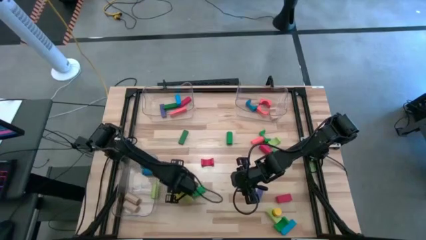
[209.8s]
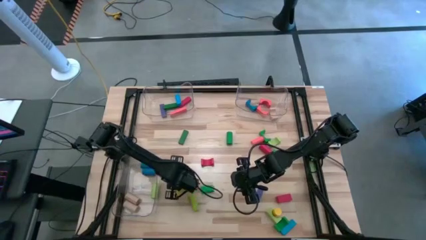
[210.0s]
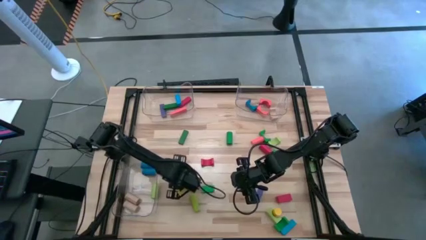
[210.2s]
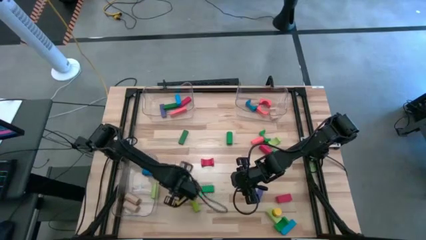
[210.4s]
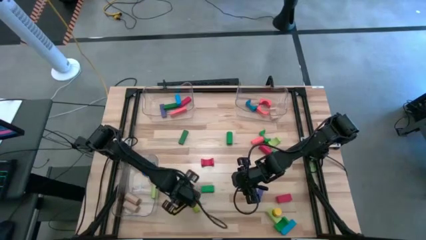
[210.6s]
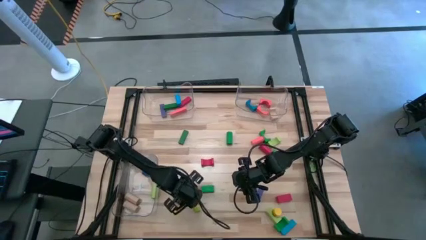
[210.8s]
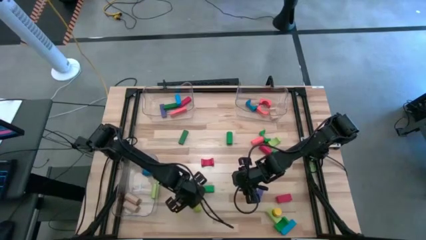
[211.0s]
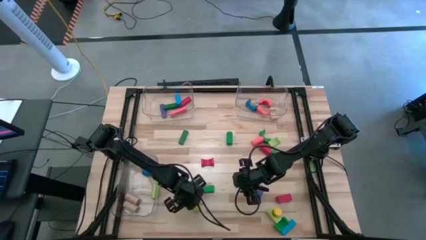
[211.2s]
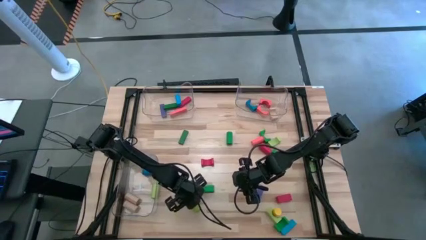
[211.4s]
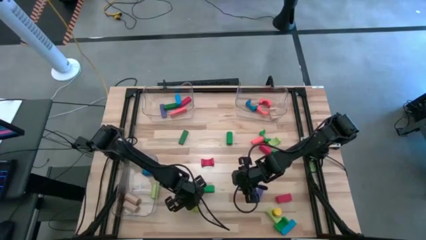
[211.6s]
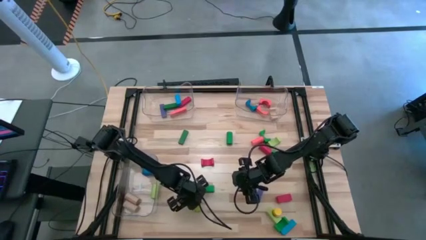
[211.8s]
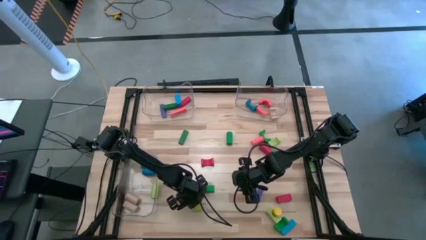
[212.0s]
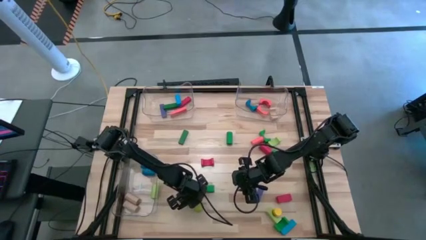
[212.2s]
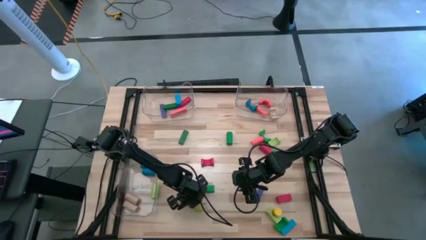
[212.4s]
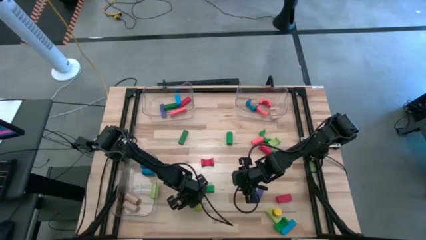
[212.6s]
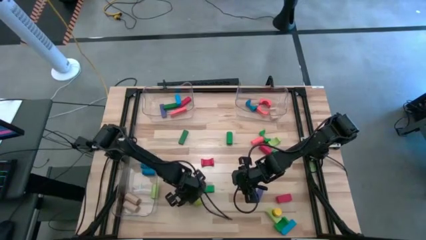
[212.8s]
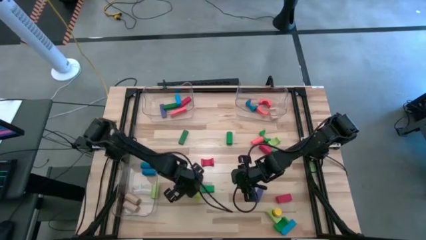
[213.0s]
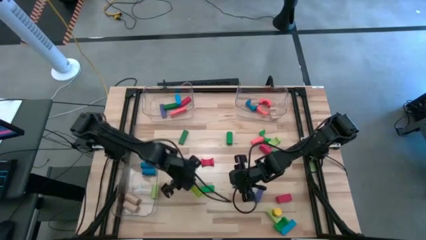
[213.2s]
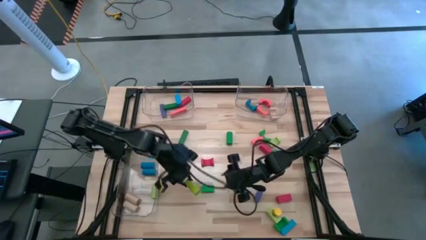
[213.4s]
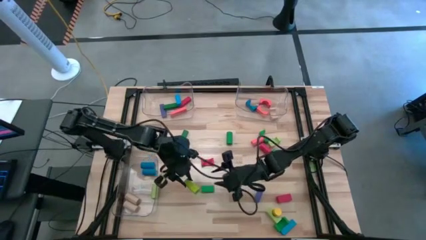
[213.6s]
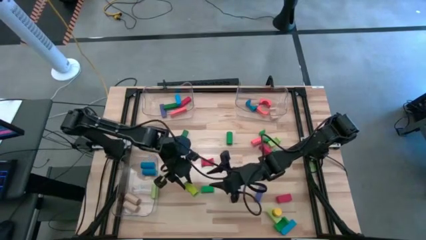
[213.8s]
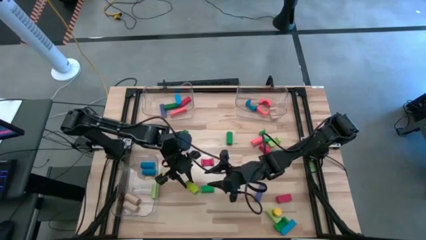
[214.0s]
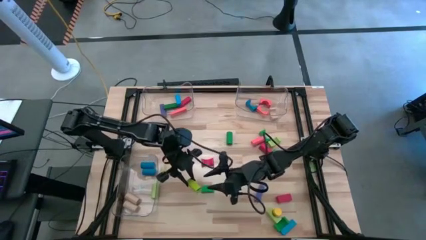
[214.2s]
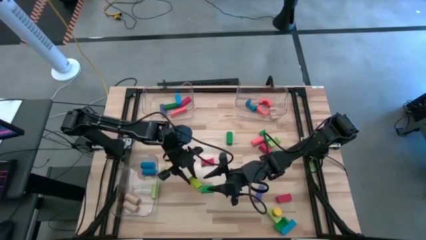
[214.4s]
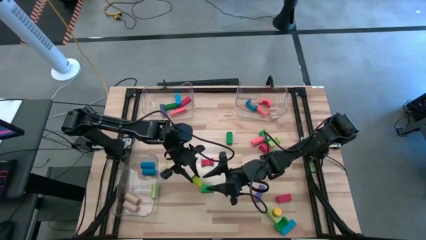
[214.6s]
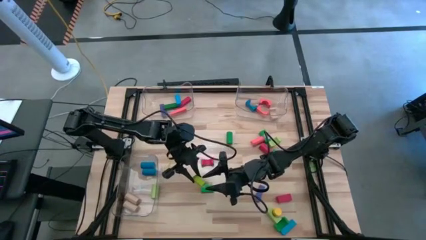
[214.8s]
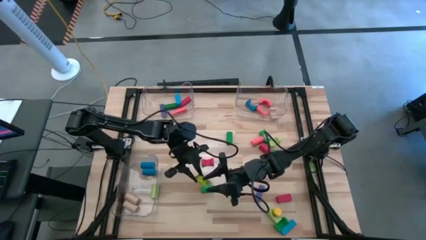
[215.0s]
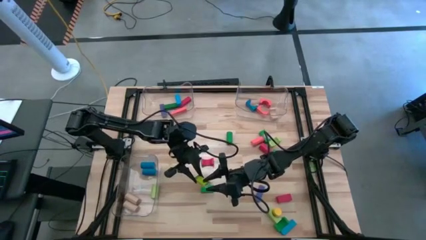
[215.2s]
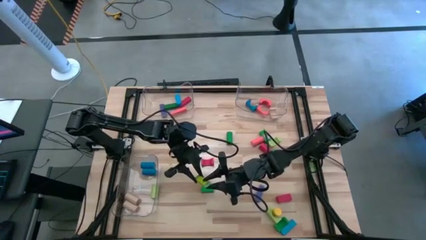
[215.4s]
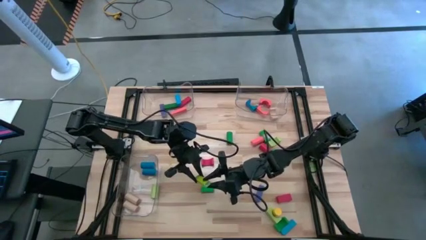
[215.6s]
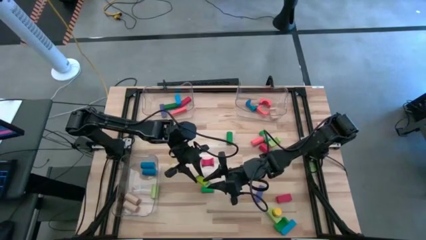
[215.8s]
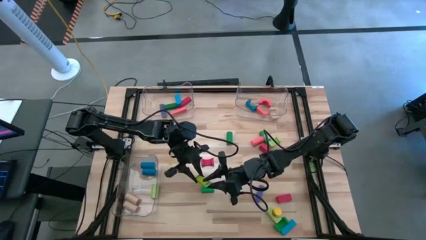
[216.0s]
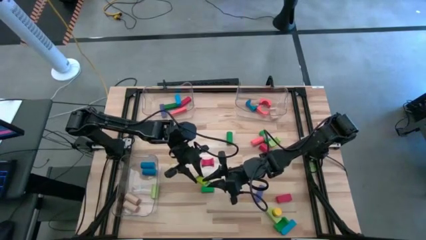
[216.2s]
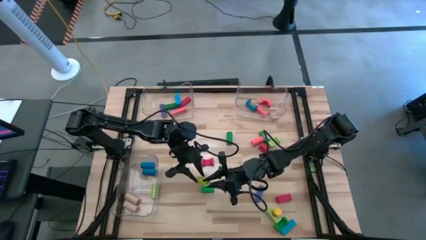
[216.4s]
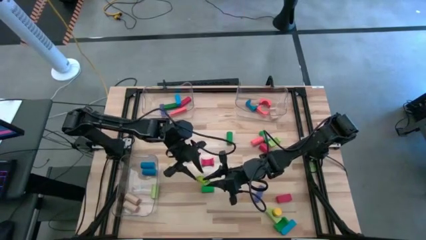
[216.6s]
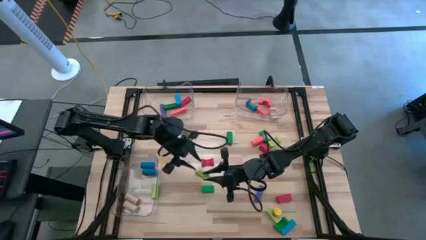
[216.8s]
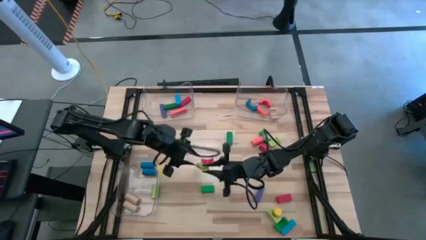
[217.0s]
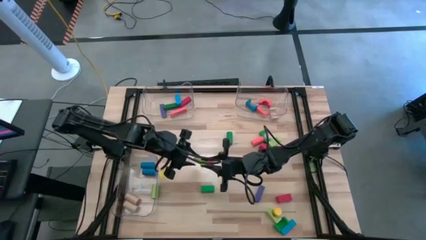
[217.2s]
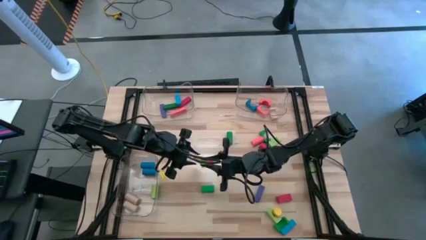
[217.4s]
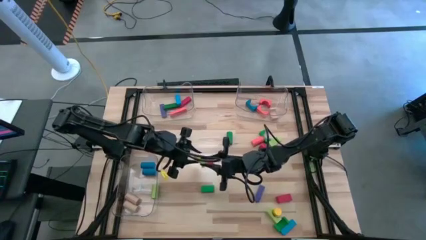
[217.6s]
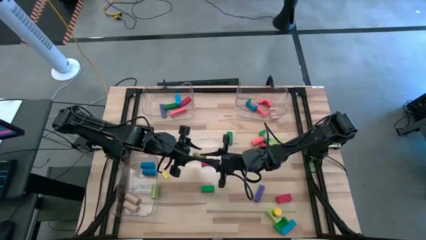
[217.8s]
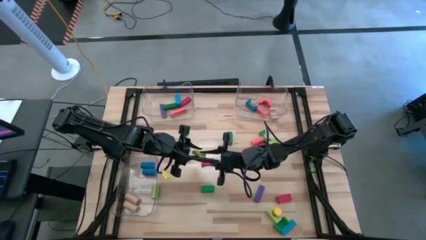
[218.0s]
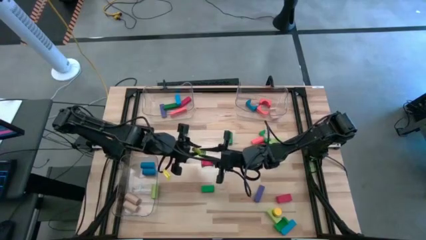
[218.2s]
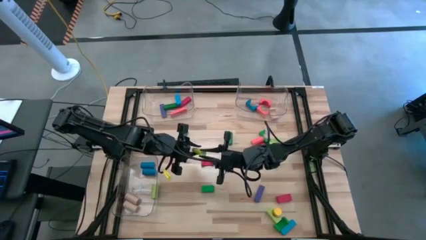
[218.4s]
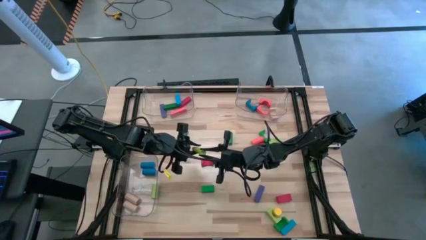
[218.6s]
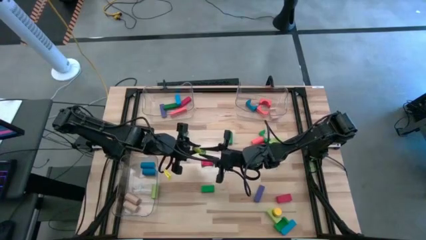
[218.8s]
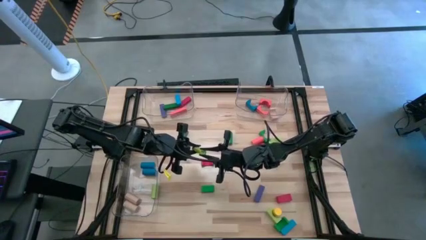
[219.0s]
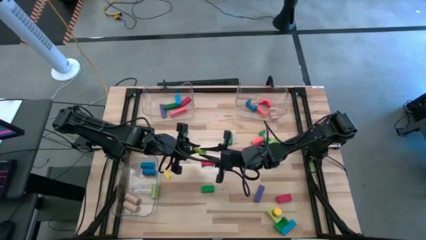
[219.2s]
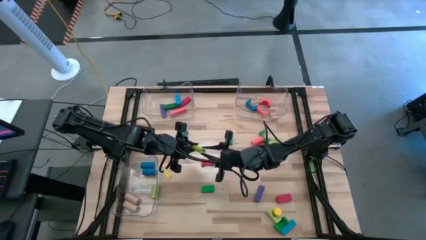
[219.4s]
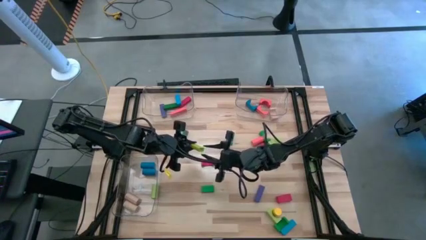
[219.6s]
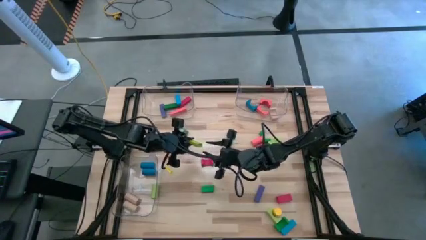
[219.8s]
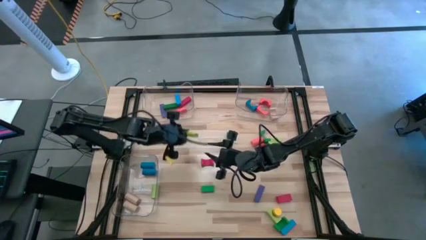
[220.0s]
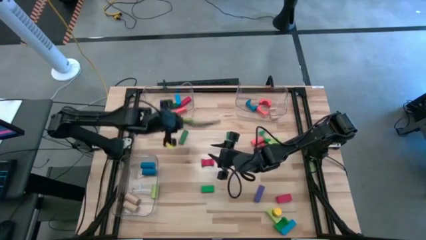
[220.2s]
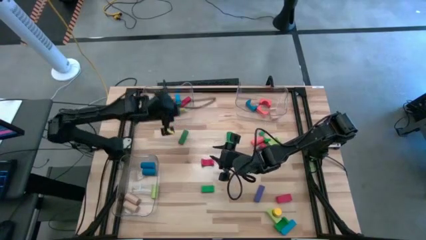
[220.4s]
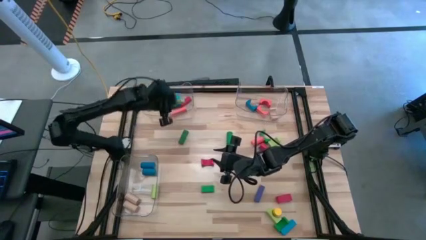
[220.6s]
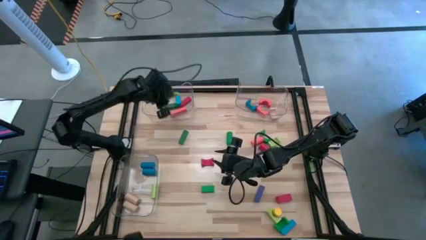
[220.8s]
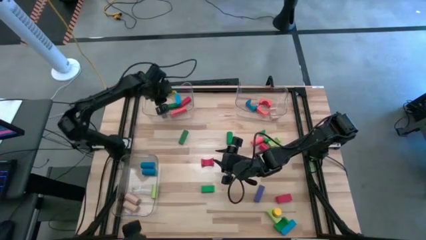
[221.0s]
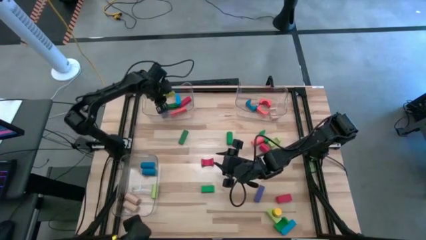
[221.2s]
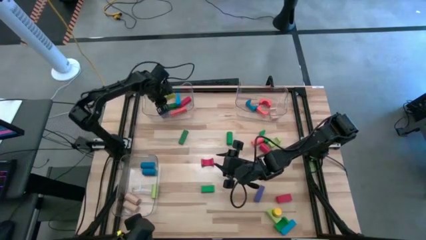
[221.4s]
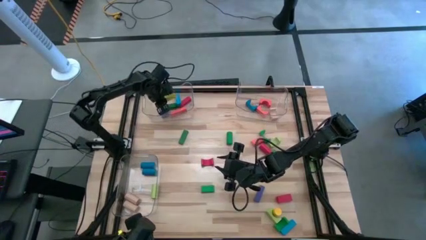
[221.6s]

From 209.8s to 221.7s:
Task: Sort blocks by size
Put the light green rectangular block into the top left transparent bin

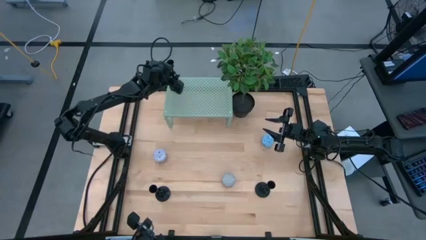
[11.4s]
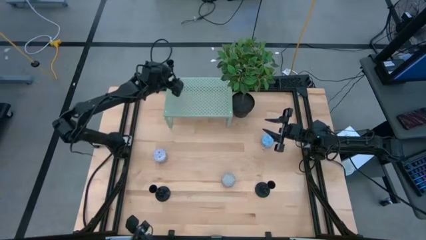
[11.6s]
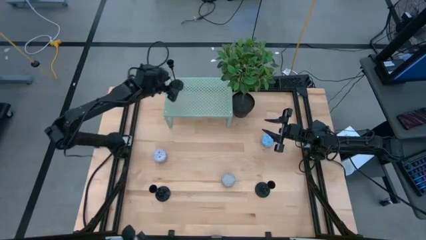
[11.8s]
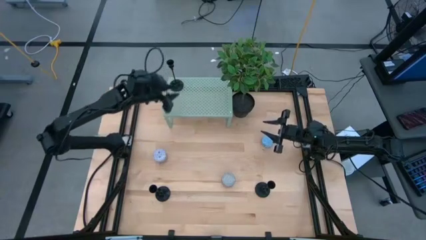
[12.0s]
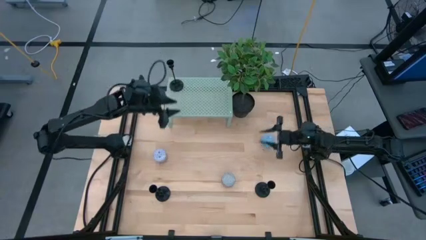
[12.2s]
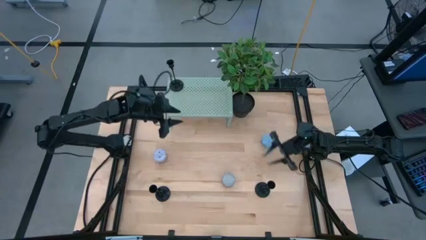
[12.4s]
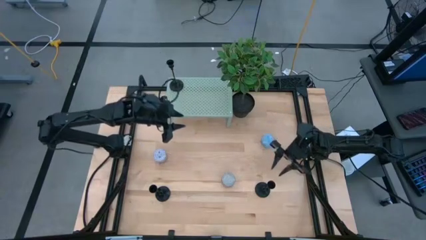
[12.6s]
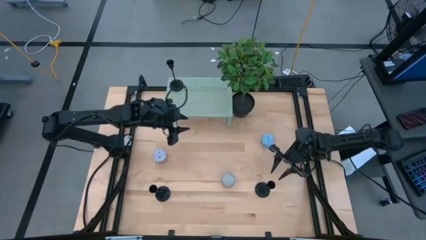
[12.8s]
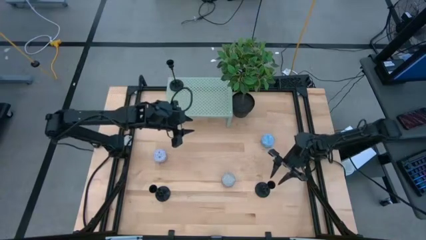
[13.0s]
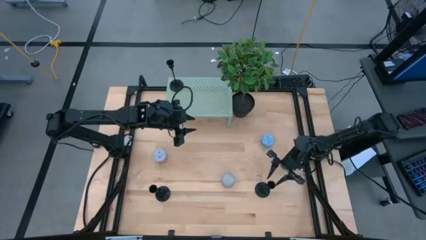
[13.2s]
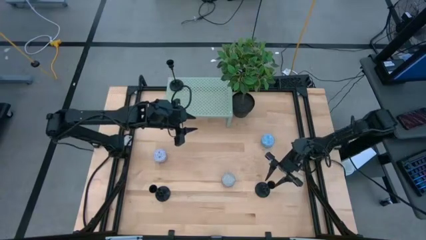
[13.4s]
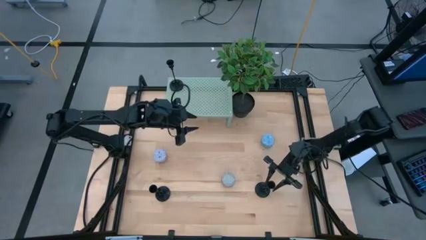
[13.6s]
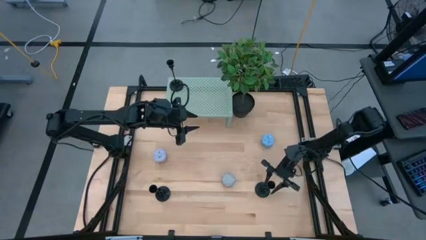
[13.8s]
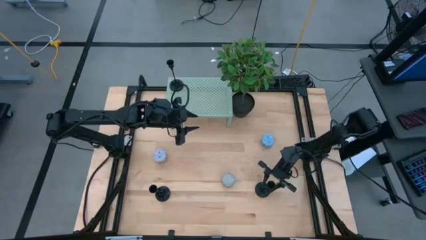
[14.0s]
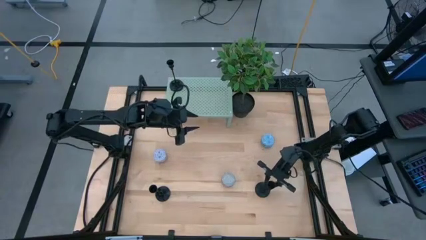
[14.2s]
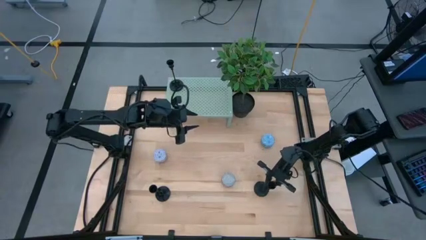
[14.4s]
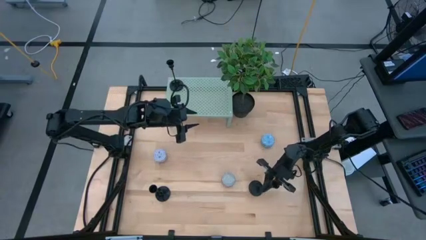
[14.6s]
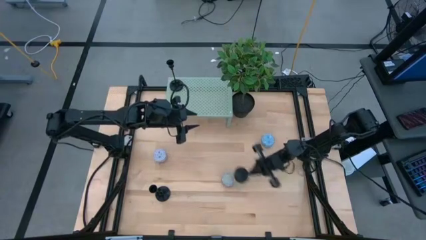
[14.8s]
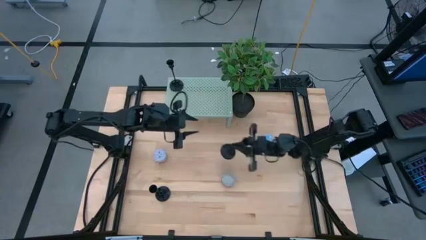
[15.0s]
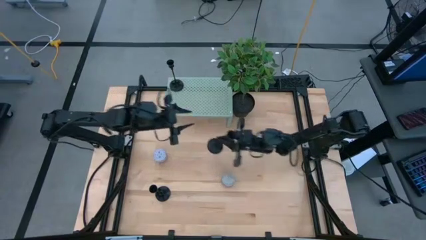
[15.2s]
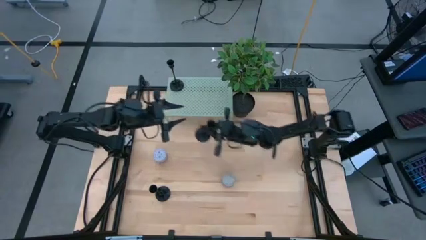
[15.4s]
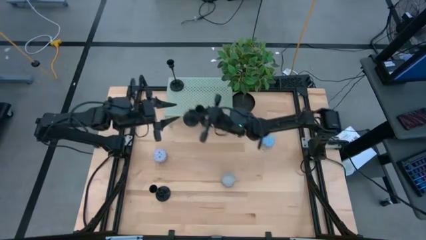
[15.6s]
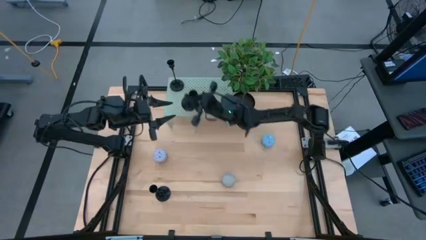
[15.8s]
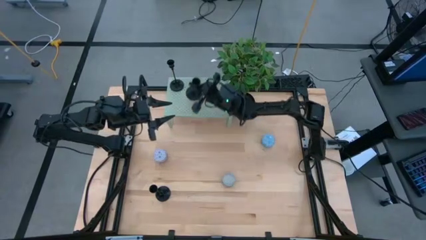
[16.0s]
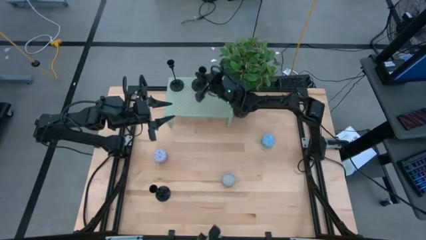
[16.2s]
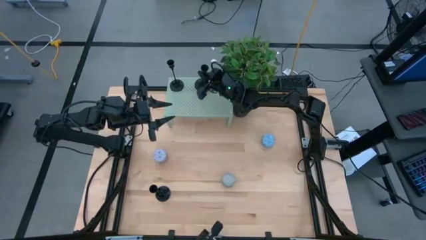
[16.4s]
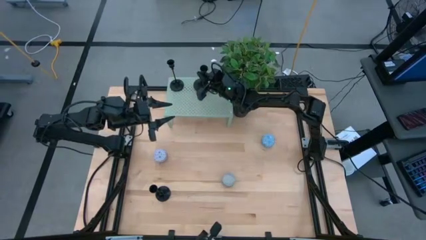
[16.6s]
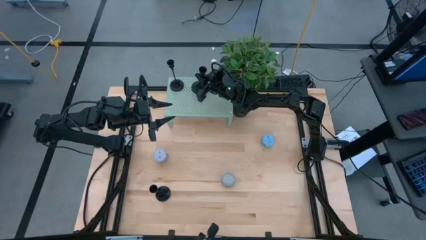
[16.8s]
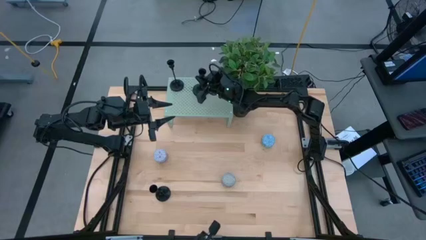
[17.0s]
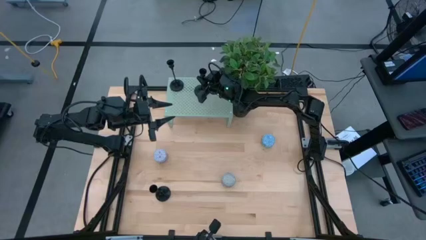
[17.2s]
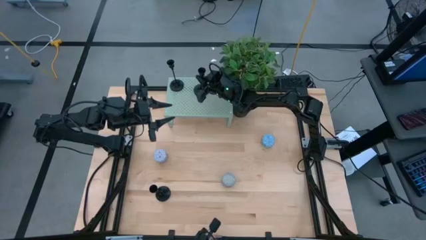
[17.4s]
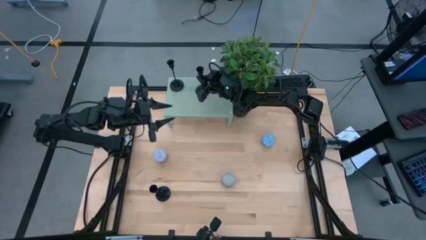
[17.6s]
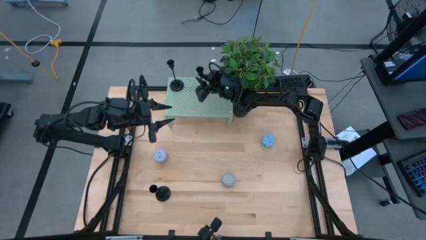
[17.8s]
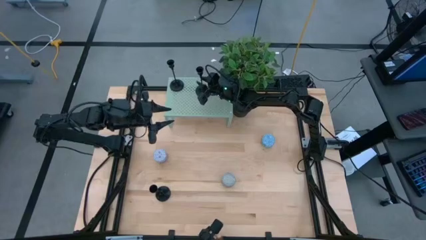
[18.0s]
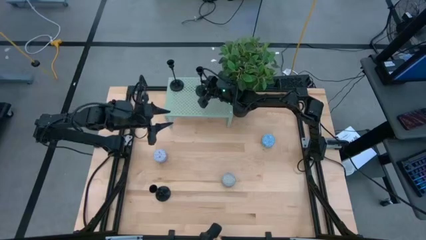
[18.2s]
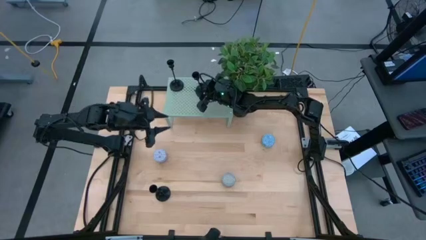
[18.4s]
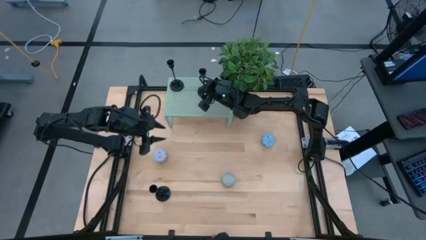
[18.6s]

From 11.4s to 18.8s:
Task: Pick & Place candle stick holders
Put the right black candle holder on the shelf aligned with the black candle holder
